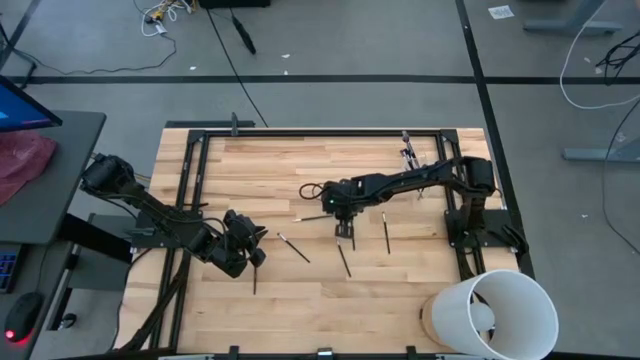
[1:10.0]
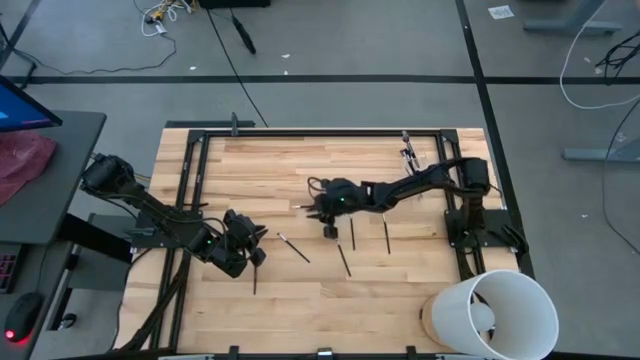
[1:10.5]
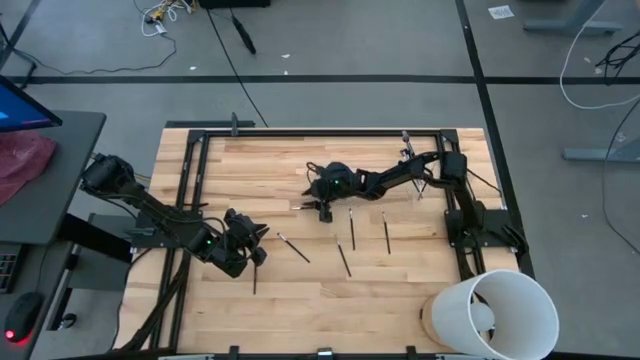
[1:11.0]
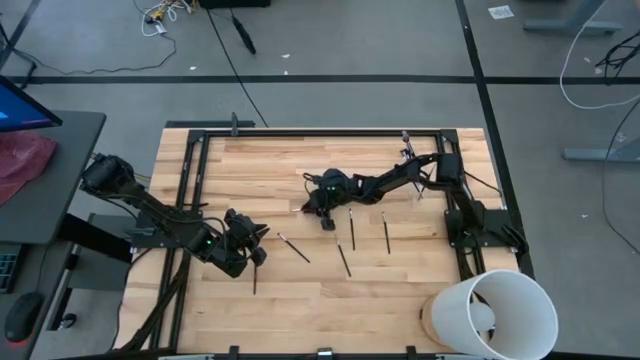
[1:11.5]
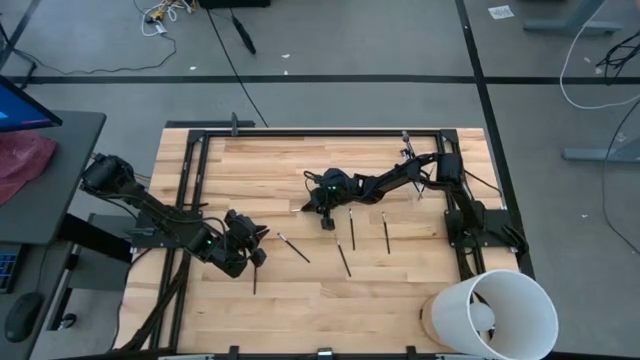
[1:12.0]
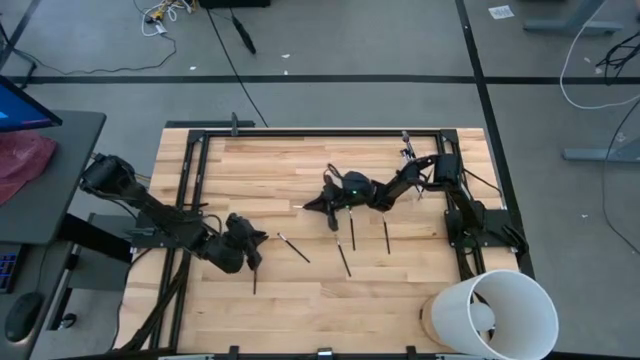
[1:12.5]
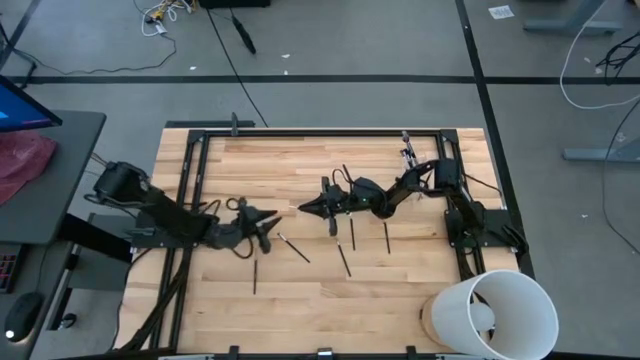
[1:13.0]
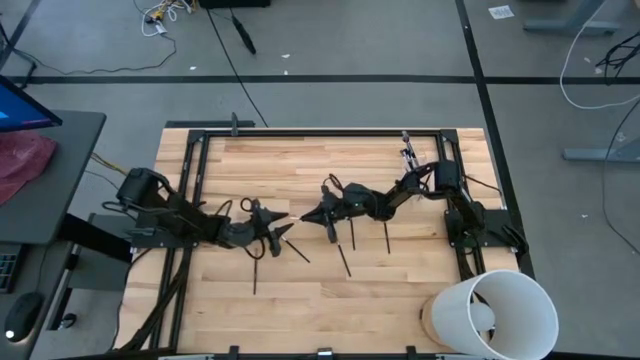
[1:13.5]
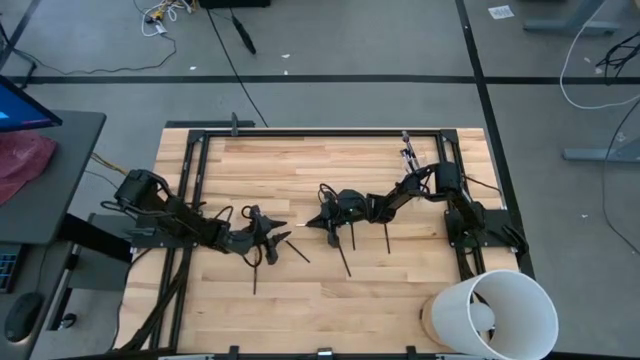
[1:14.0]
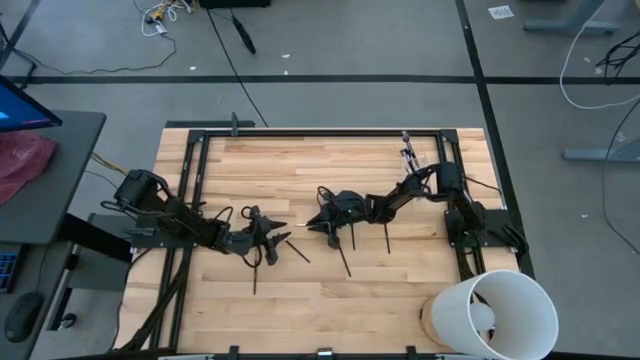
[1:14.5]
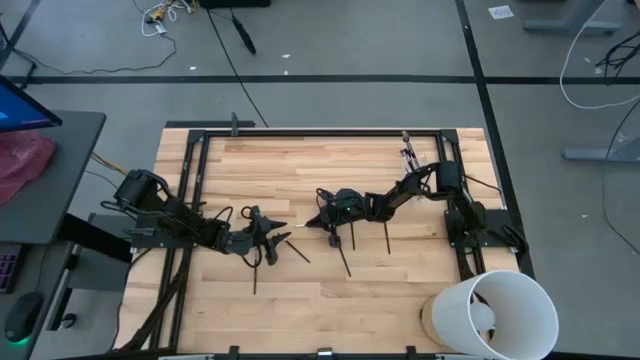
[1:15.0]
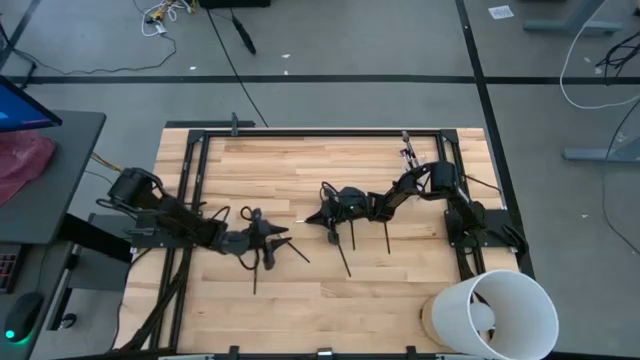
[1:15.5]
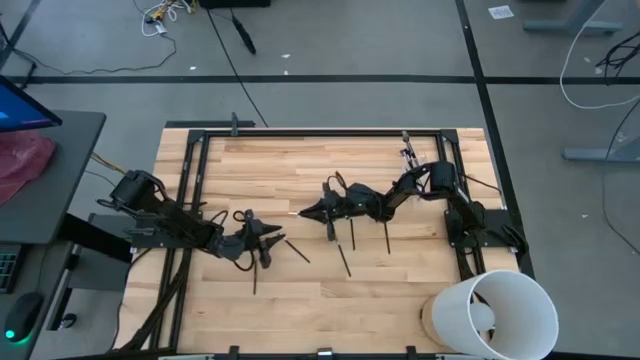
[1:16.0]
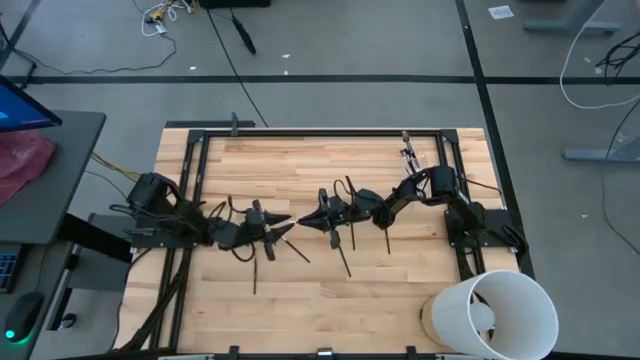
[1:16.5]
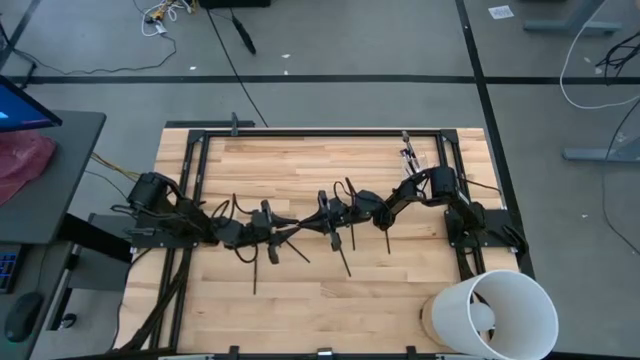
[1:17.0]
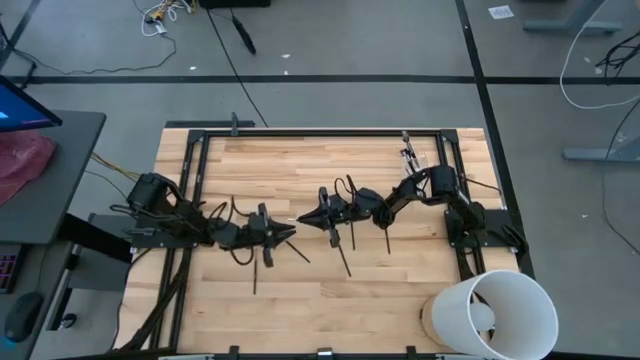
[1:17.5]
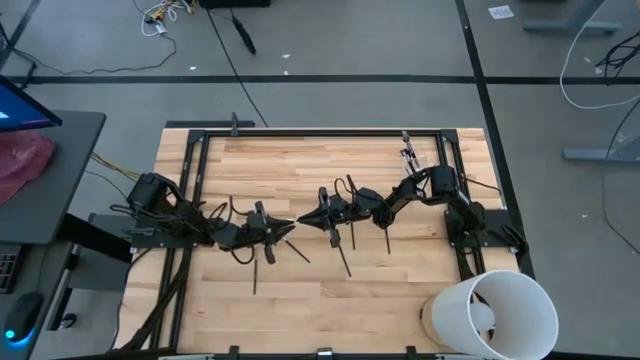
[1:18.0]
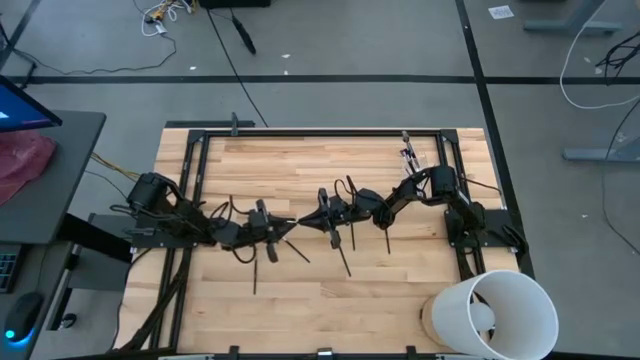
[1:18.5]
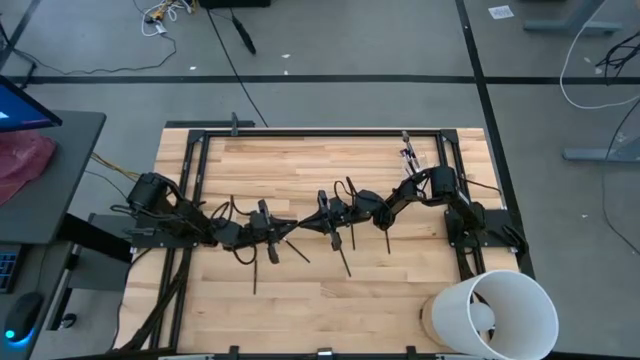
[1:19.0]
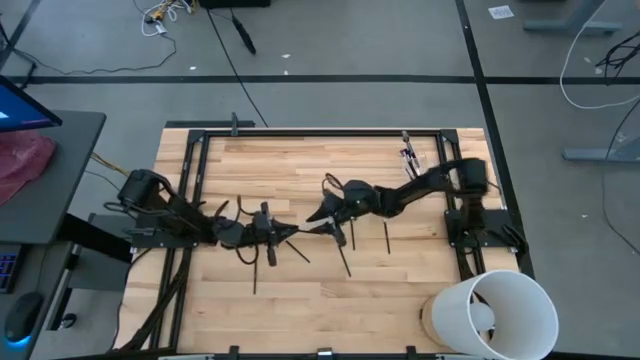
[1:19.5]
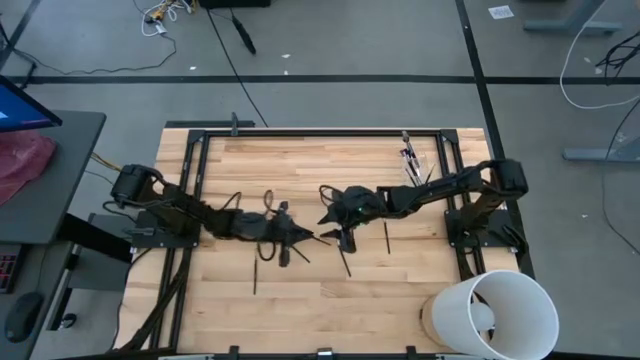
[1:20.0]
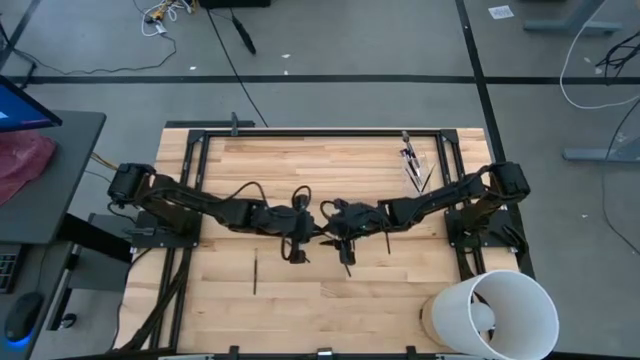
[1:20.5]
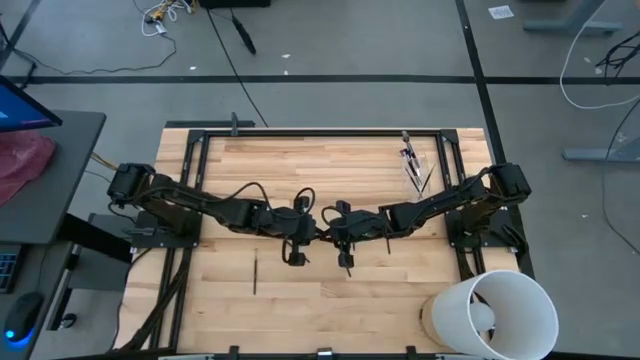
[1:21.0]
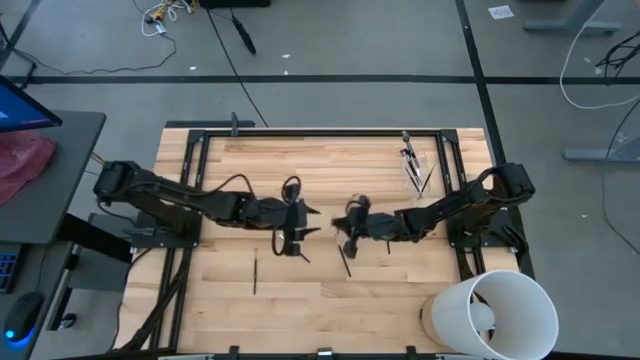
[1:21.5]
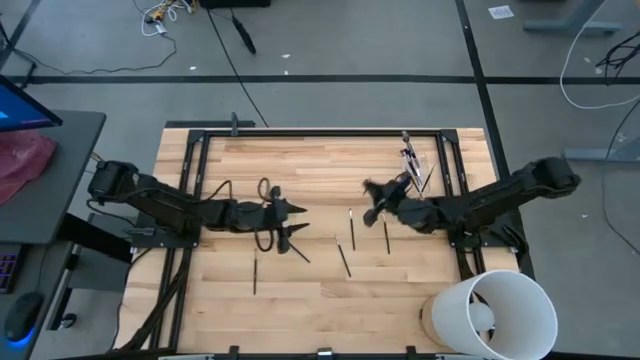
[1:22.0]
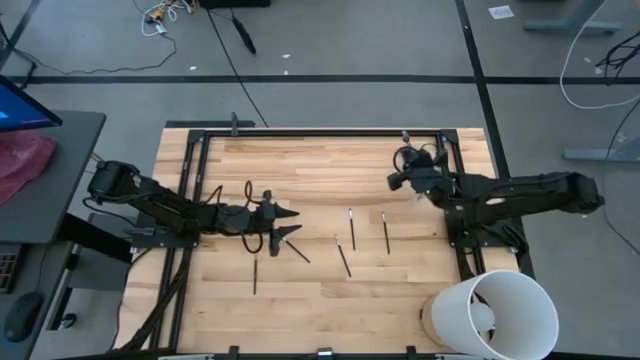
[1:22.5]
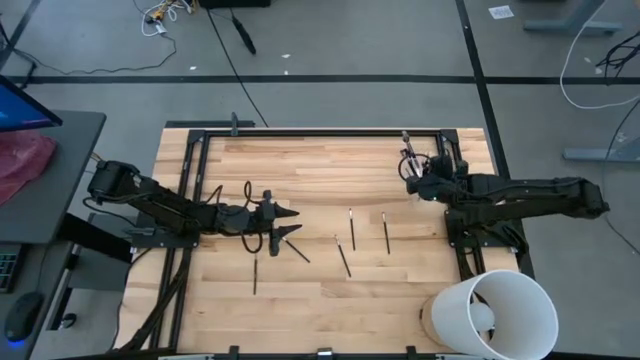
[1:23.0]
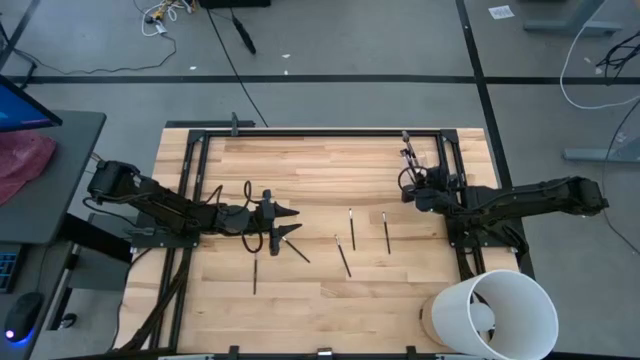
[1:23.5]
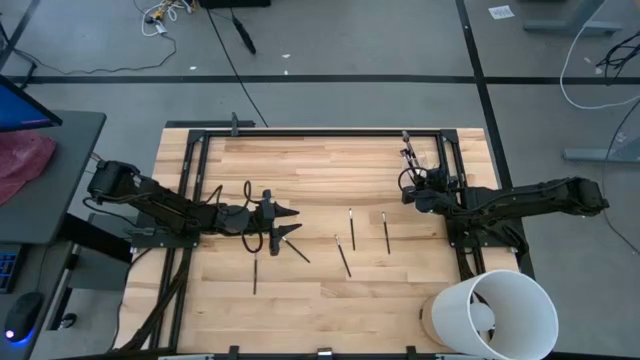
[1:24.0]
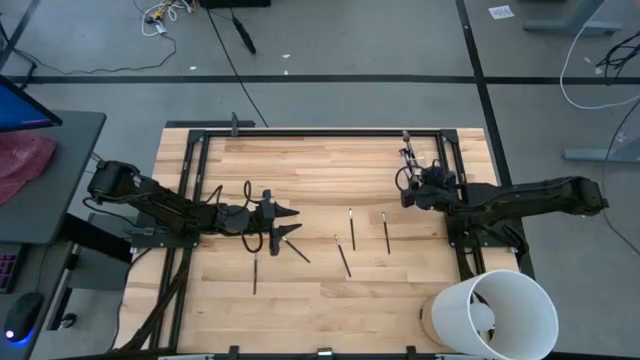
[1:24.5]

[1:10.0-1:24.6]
Task: Put items in baskets/containers
Put the liner brush into the transparent organizer

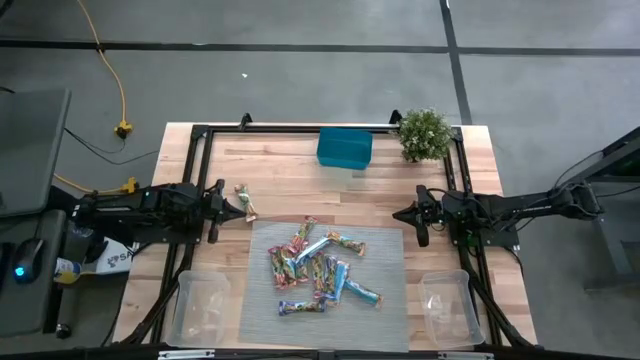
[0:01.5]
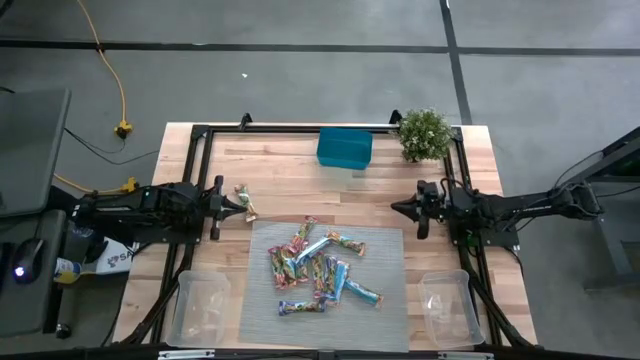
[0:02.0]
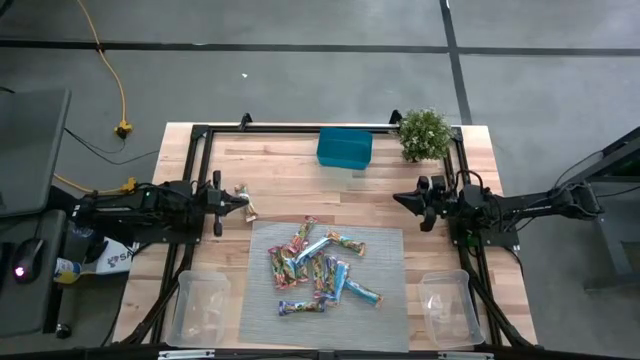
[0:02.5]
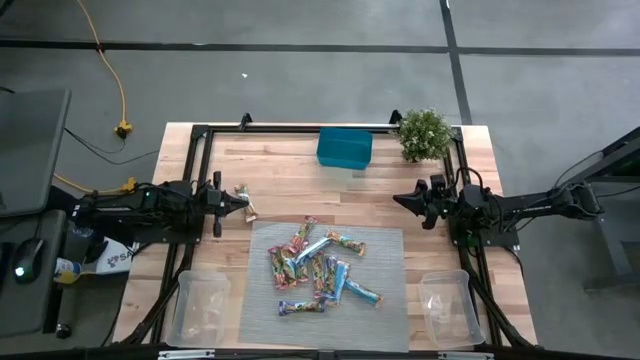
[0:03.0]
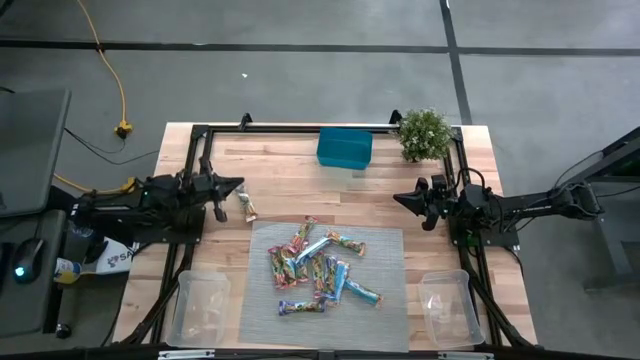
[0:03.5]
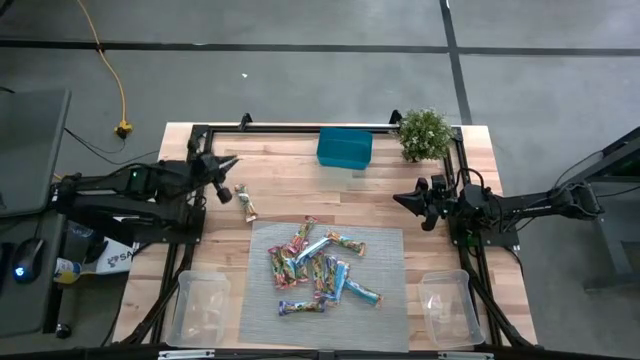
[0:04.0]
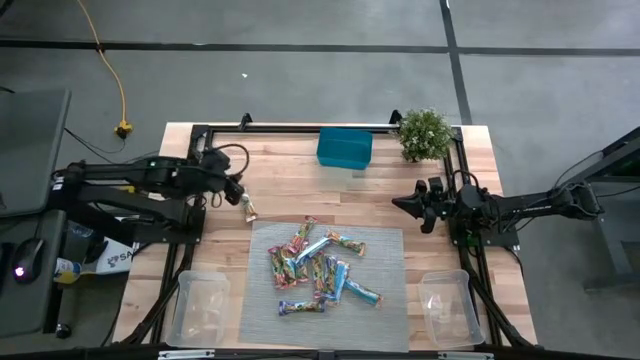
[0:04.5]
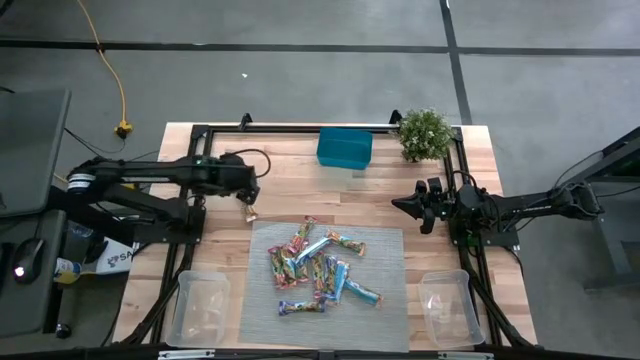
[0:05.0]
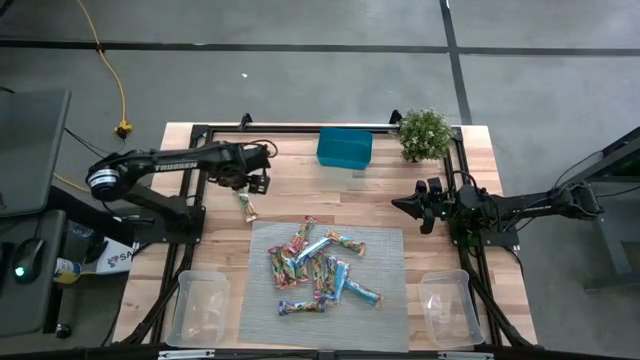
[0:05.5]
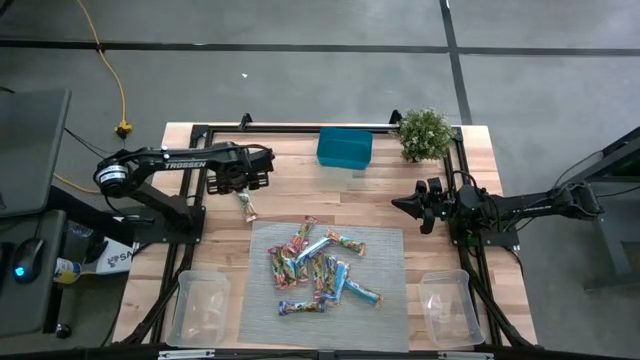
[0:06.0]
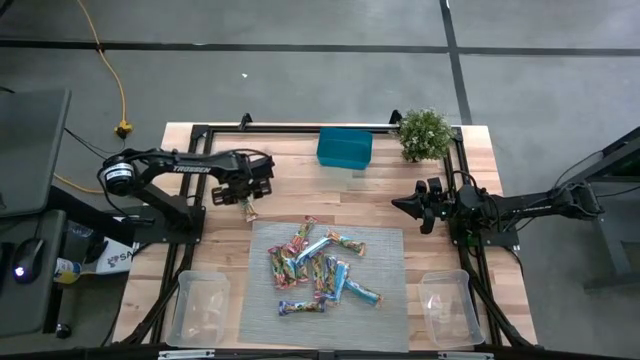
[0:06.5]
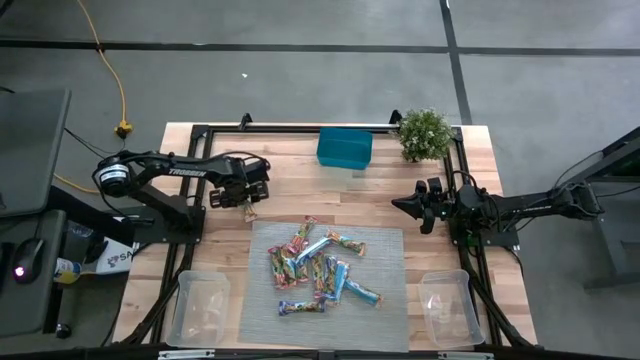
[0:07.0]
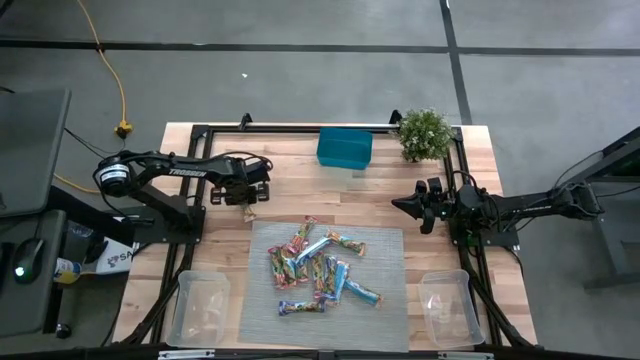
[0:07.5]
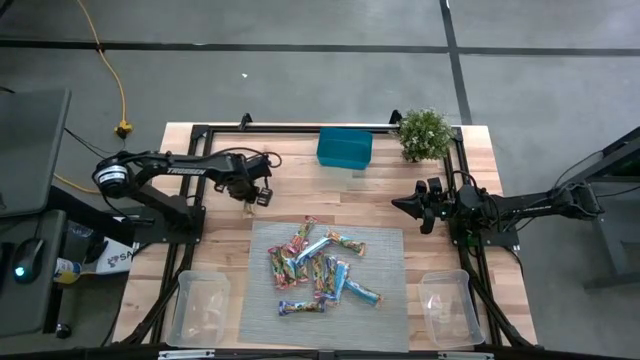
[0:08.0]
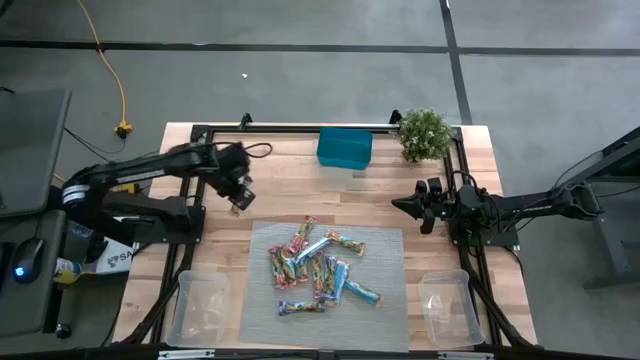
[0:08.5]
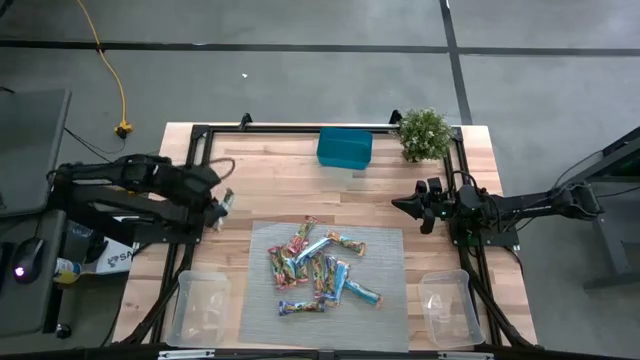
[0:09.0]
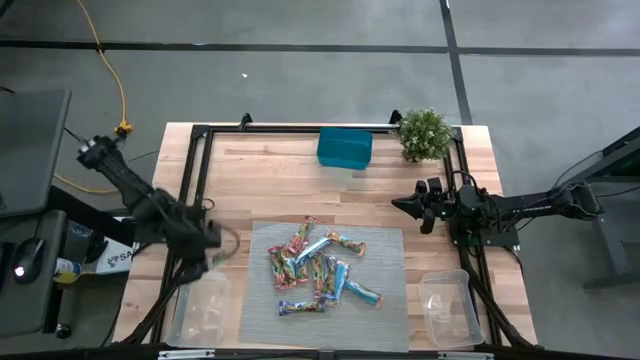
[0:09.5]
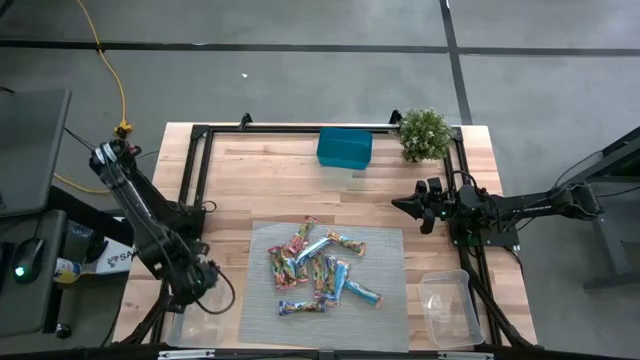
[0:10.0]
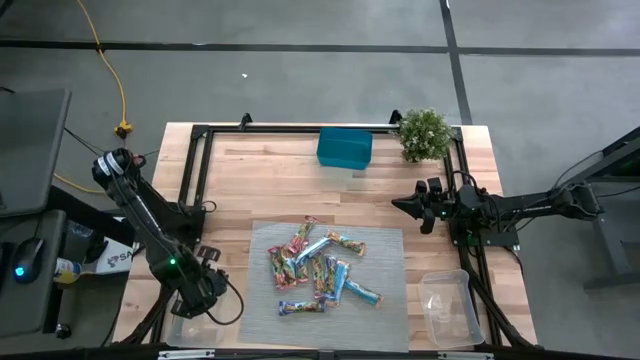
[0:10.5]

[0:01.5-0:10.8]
Task: Pick and place Granola Bars by type
Put the yellow granola bar into the left transparent bin
